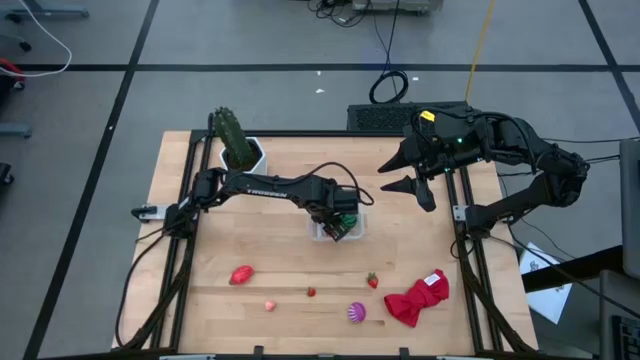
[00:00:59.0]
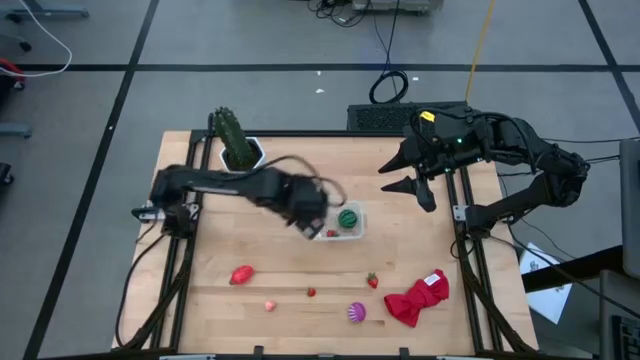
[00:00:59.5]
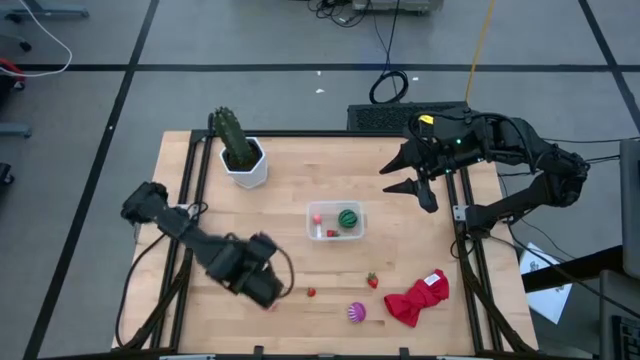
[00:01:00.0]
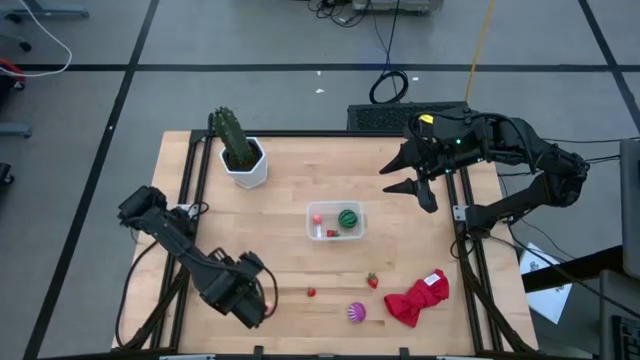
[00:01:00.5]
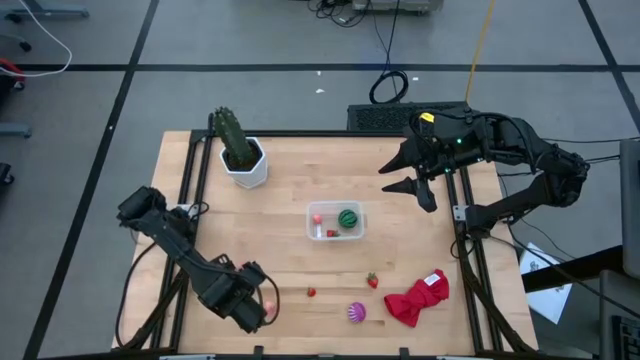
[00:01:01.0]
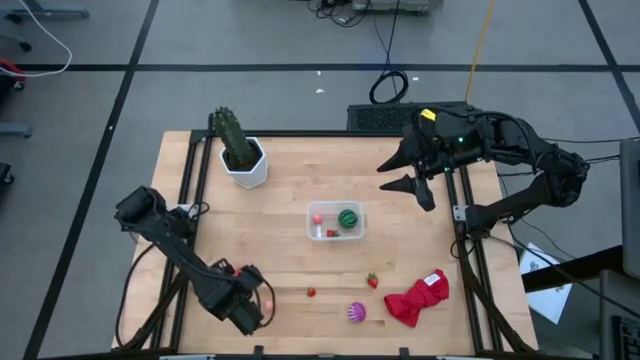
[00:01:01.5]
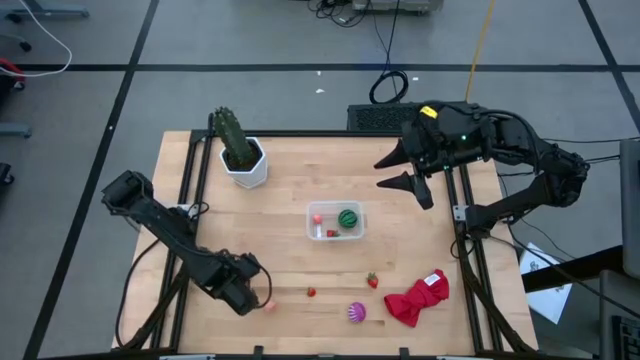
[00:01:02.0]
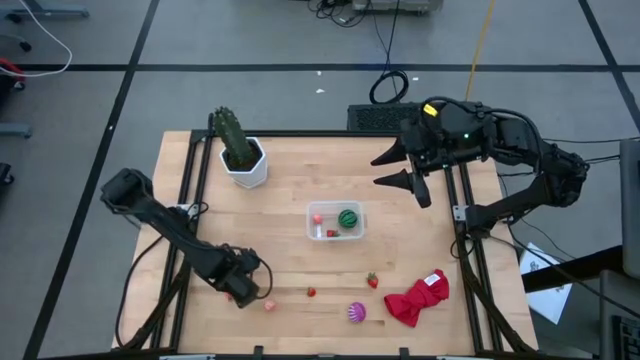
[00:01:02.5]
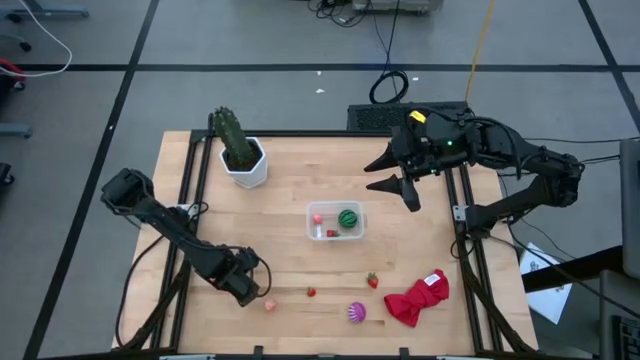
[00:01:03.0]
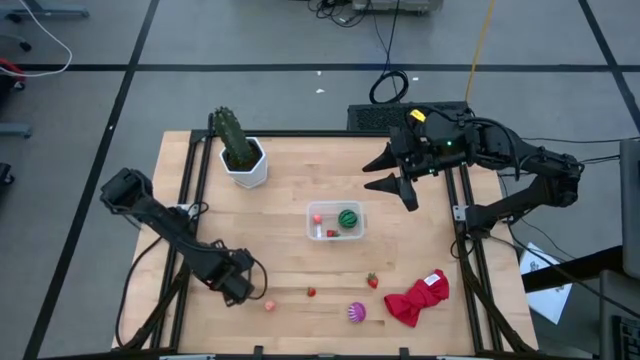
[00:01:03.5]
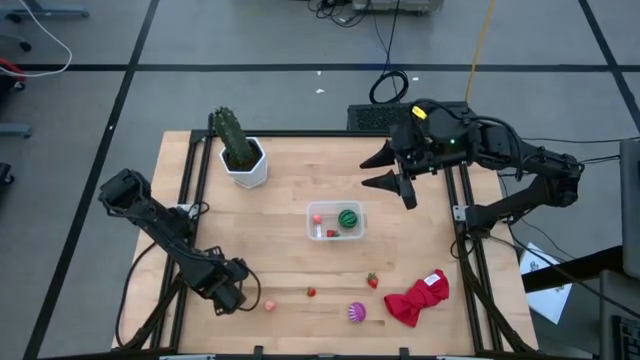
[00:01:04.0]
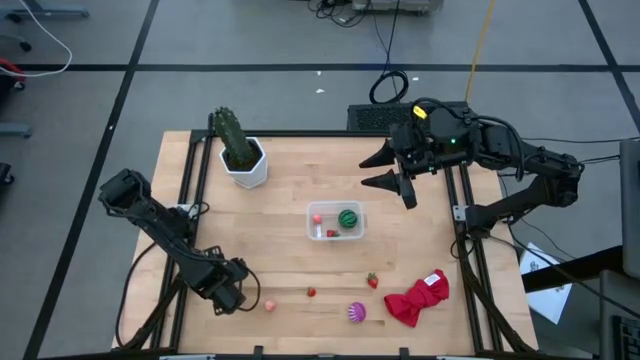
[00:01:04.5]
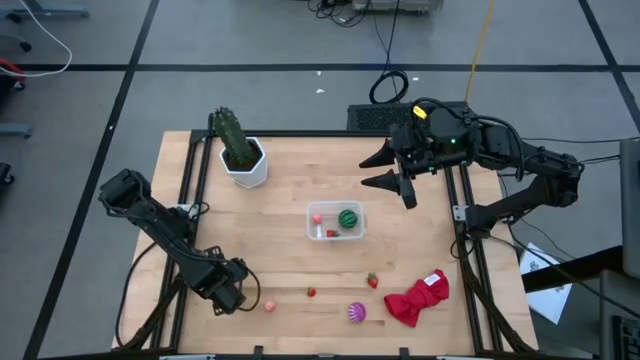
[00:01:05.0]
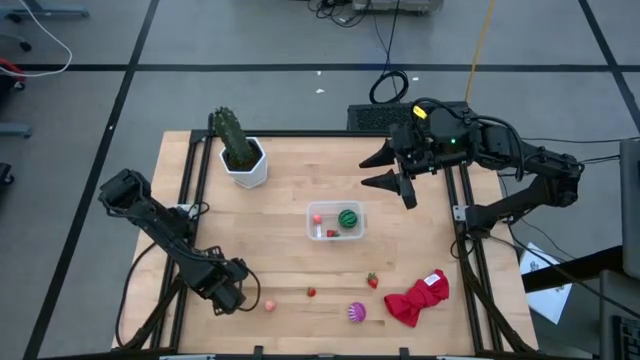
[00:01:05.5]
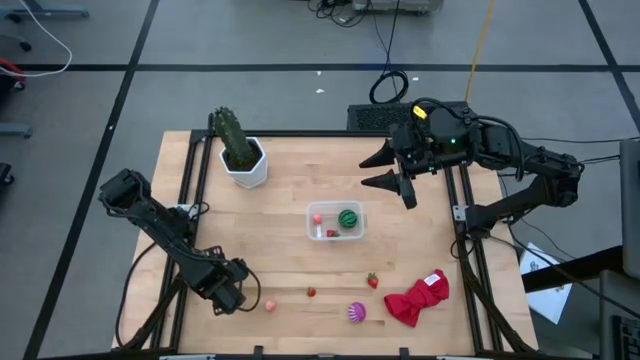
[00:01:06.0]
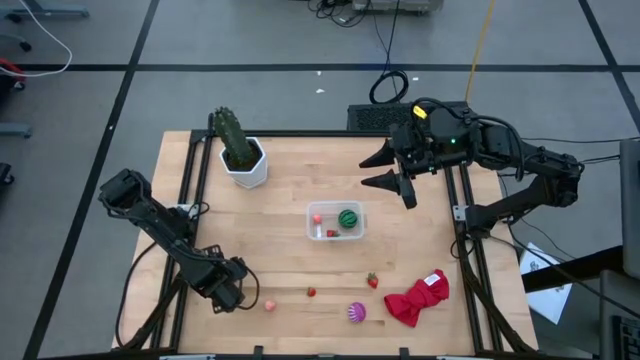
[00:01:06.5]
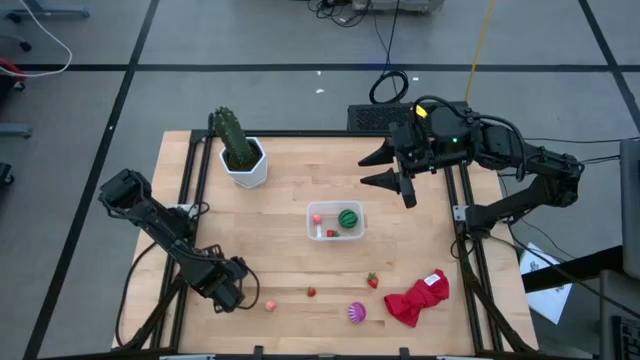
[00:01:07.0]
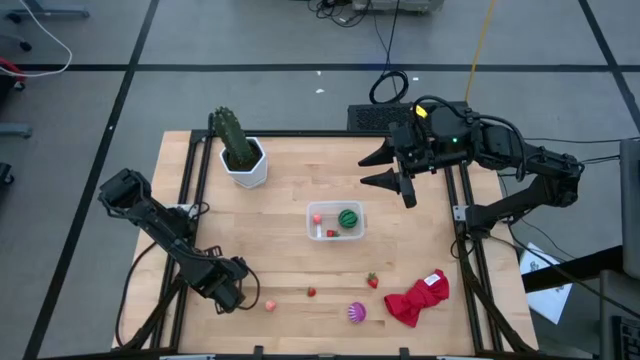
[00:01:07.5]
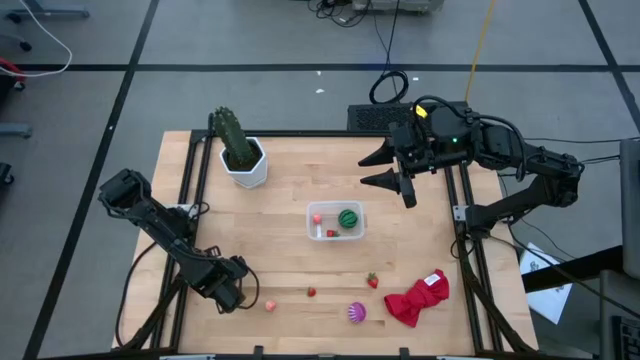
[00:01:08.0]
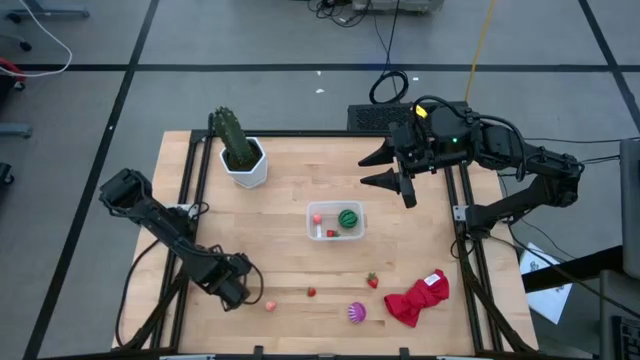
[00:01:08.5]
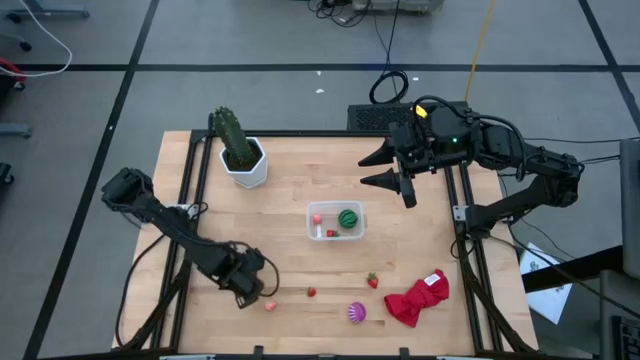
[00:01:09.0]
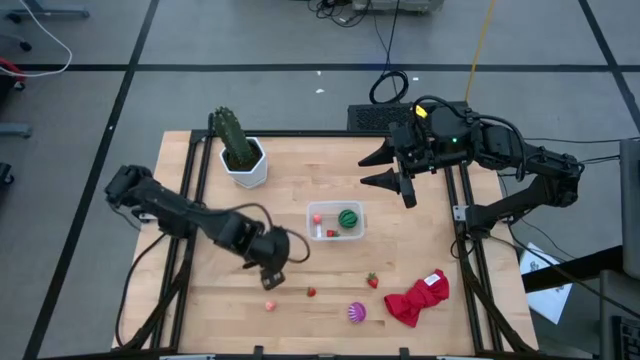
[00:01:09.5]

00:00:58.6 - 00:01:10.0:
Task: Pick and placing Produce into tupperware
Put the dragon fruit into the transparent bin

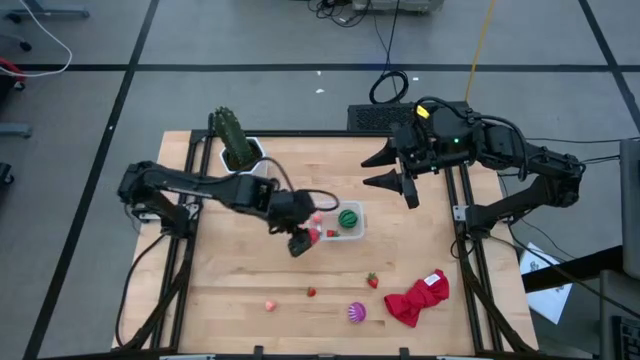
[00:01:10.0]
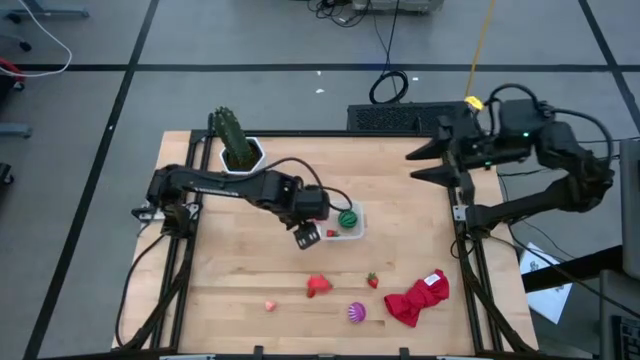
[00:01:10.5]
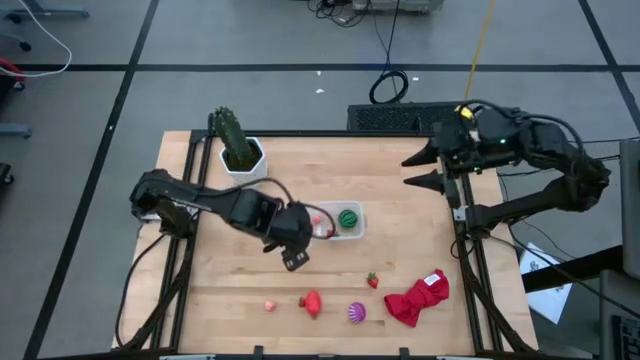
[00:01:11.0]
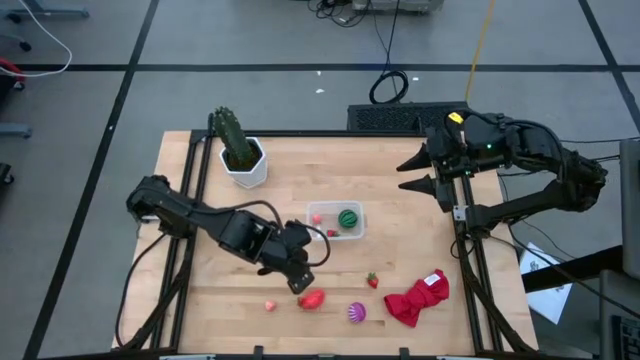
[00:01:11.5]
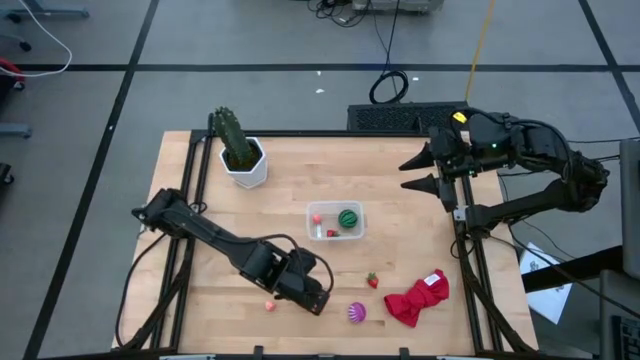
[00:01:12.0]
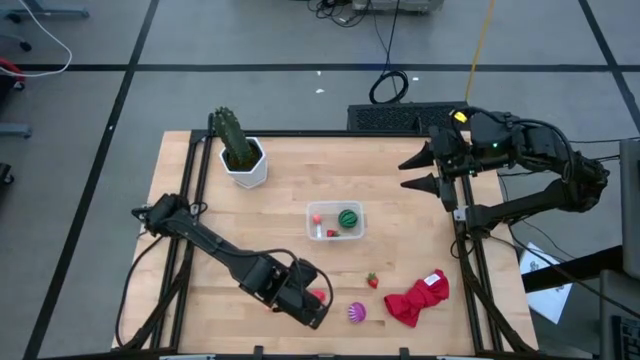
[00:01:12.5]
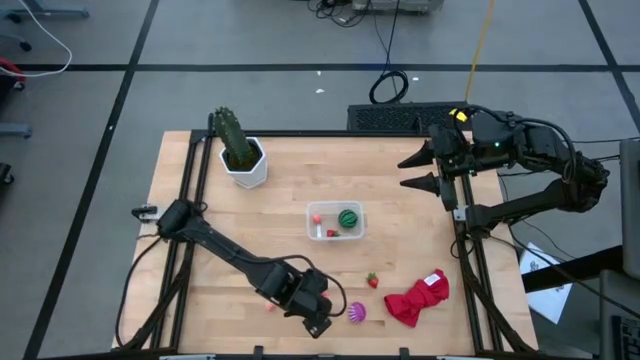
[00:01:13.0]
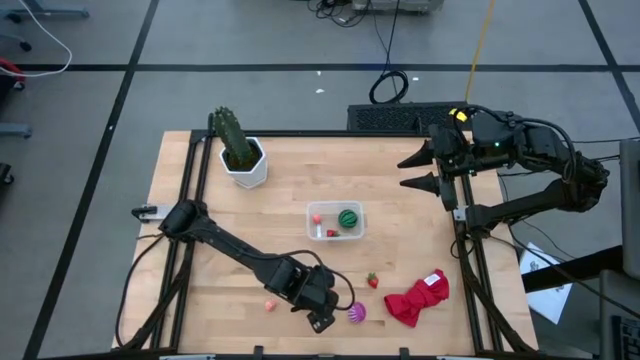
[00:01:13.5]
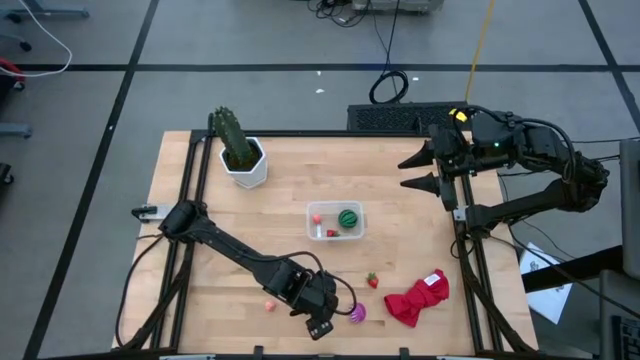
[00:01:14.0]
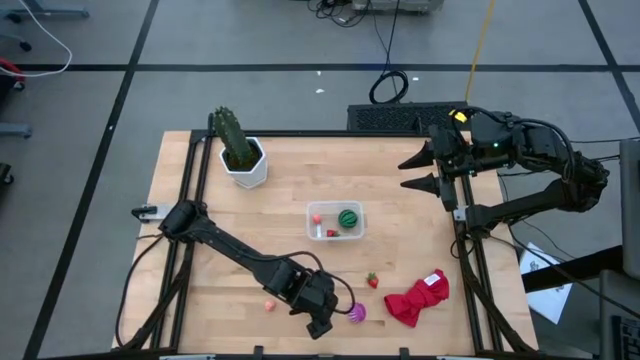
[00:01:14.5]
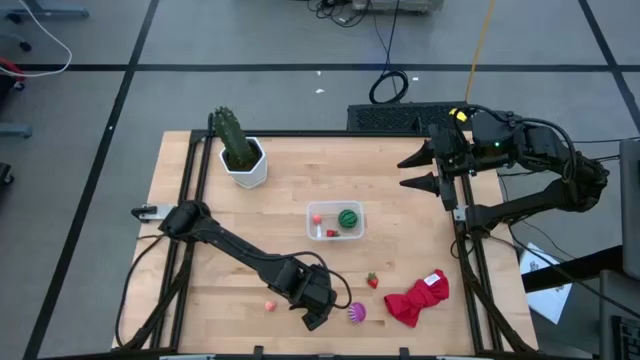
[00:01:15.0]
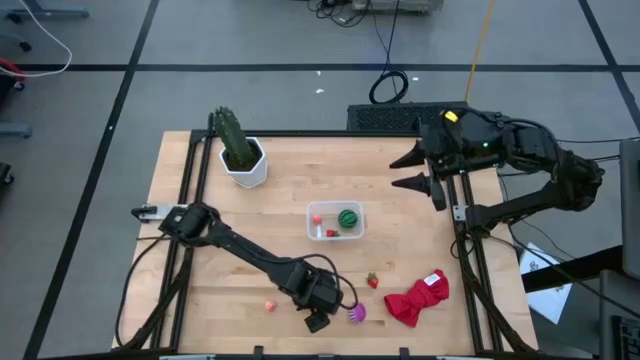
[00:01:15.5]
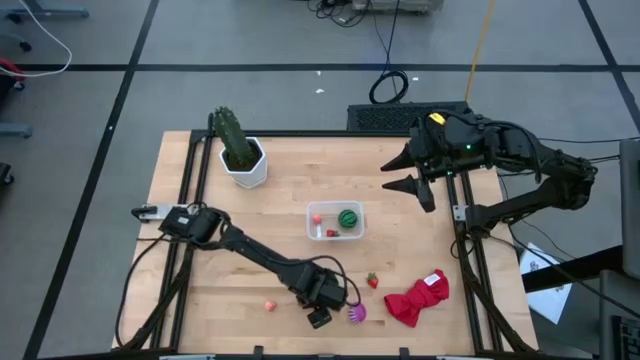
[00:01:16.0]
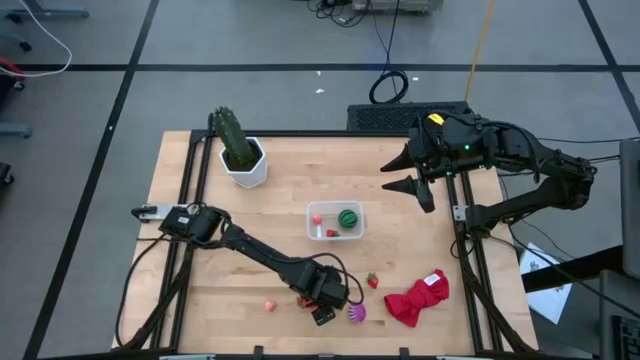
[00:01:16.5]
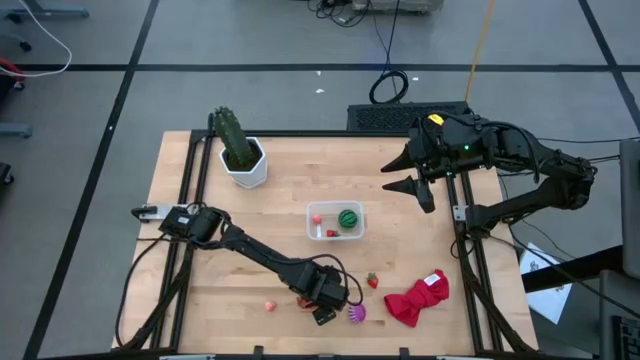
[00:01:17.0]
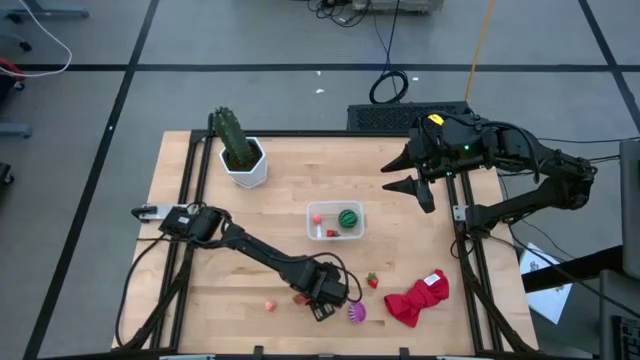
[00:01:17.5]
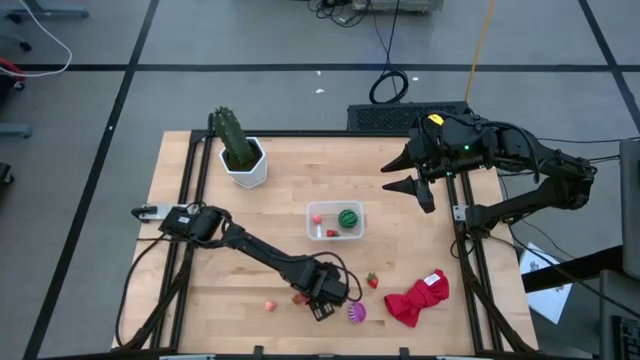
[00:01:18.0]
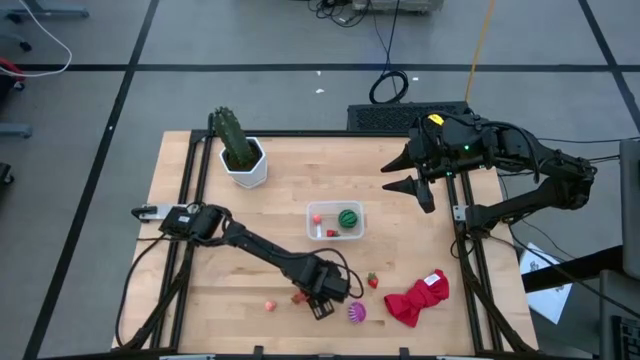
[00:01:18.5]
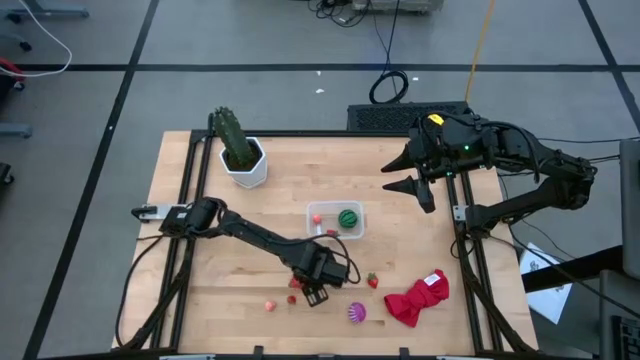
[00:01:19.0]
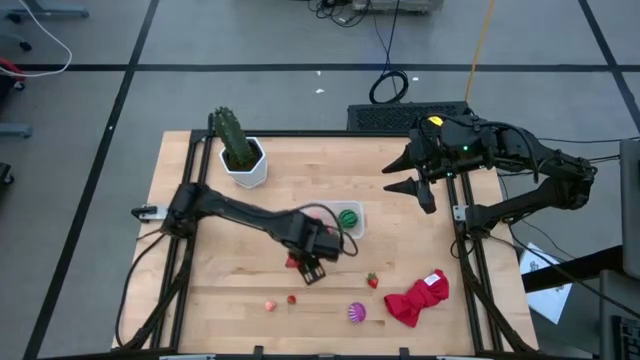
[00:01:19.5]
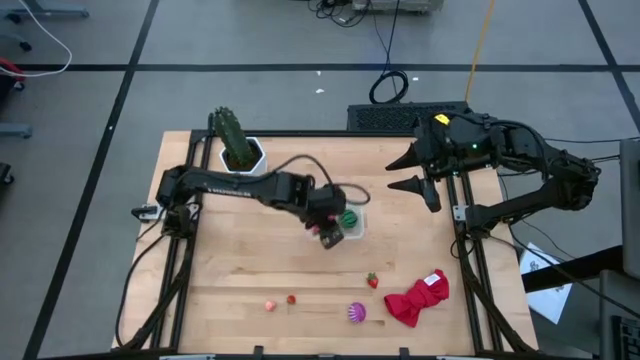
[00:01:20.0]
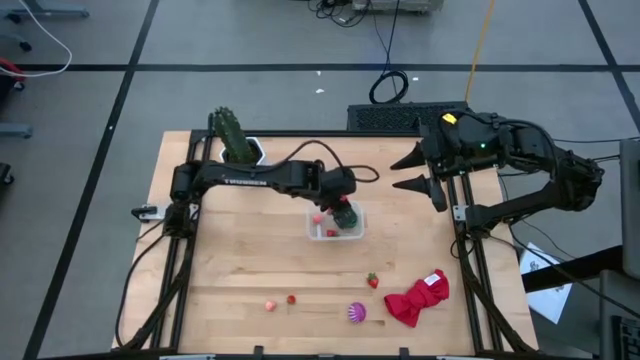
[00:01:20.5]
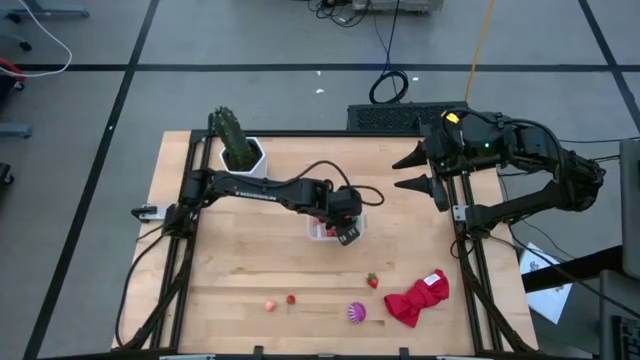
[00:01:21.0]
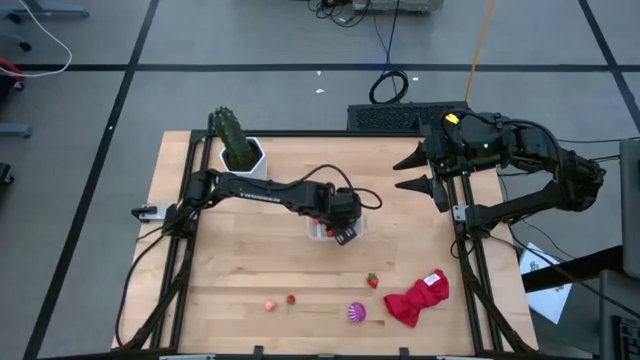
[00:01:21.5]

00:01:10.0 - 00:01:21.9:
Put the dragon fruit into the transparent bin
